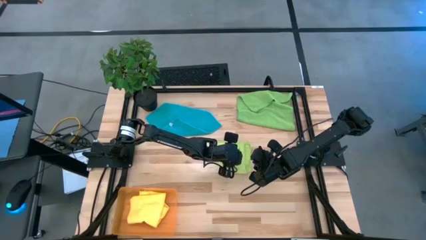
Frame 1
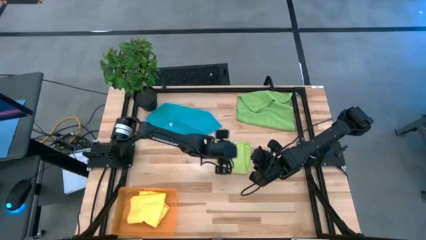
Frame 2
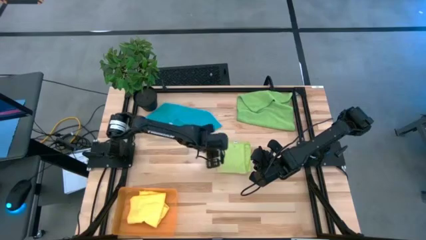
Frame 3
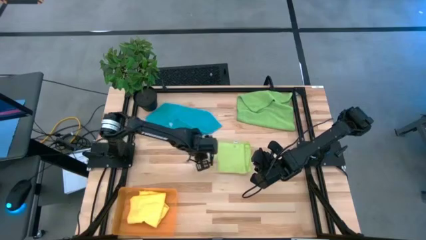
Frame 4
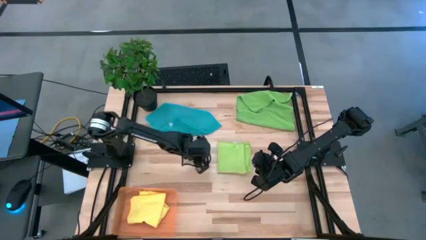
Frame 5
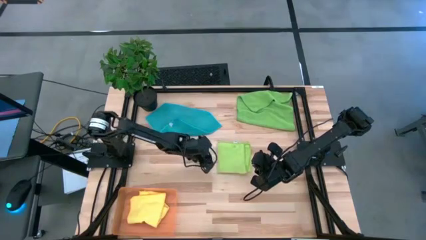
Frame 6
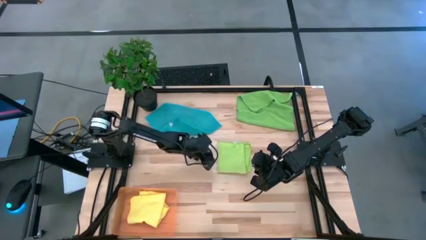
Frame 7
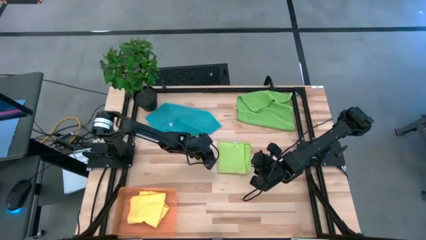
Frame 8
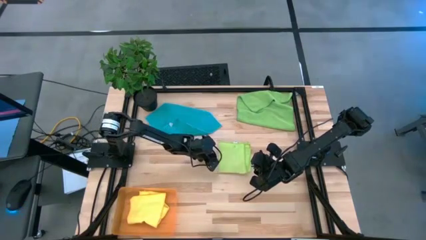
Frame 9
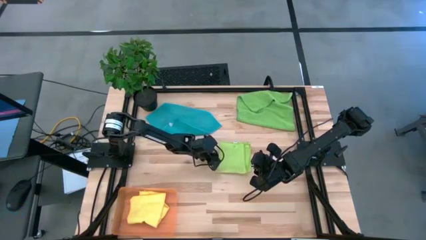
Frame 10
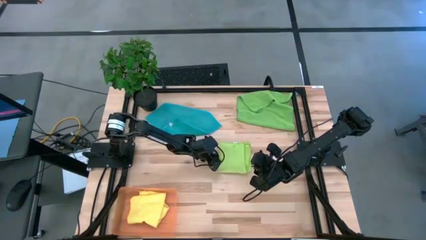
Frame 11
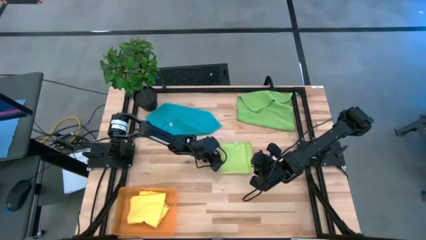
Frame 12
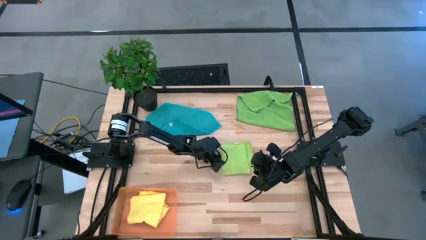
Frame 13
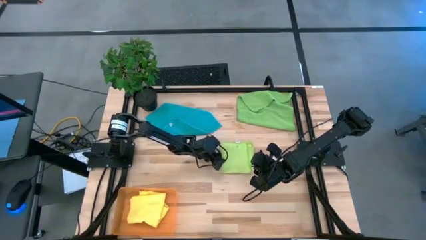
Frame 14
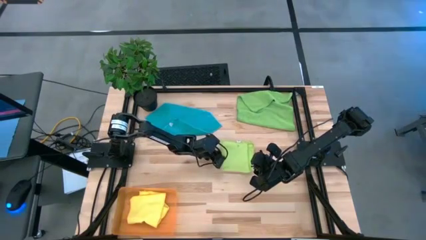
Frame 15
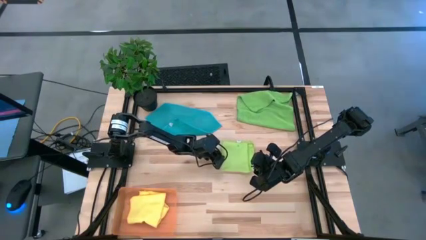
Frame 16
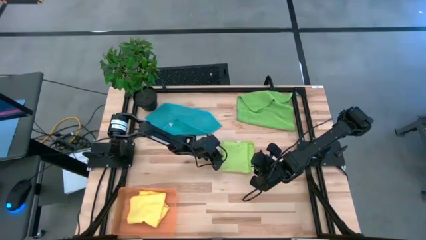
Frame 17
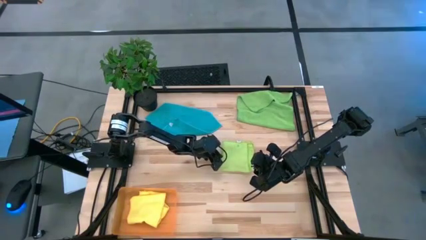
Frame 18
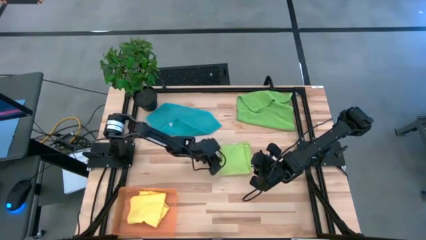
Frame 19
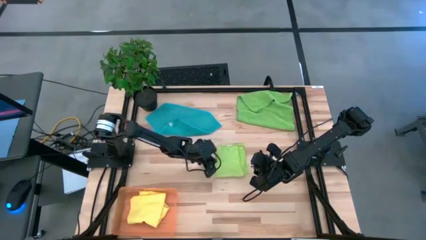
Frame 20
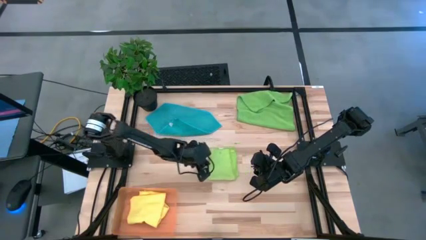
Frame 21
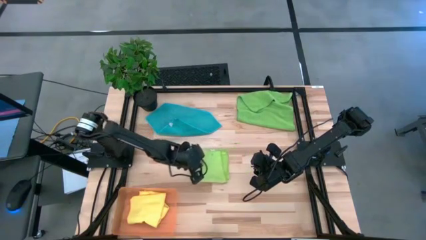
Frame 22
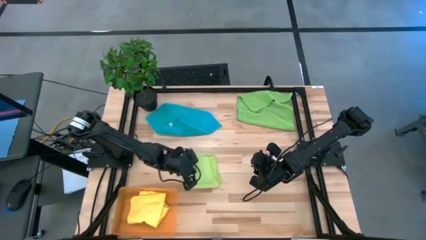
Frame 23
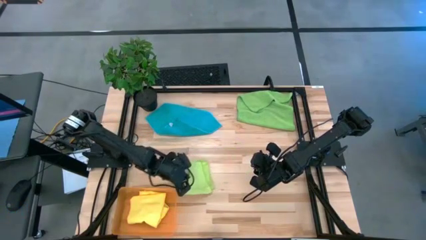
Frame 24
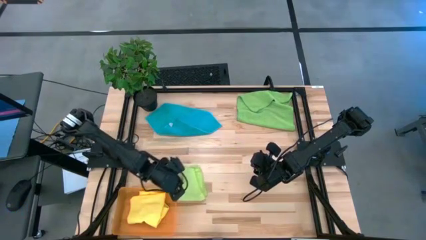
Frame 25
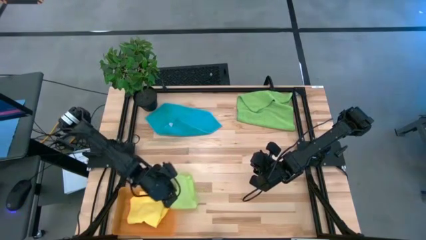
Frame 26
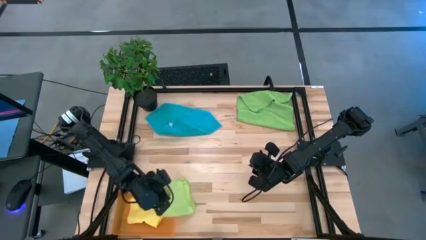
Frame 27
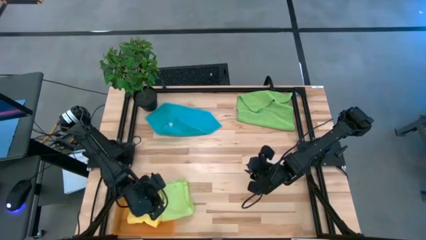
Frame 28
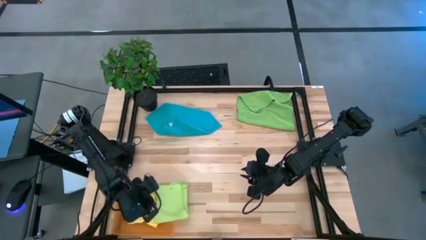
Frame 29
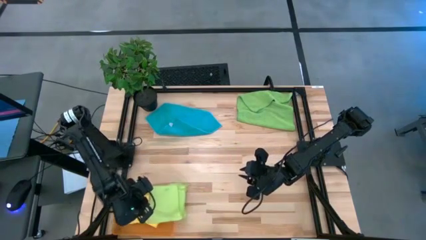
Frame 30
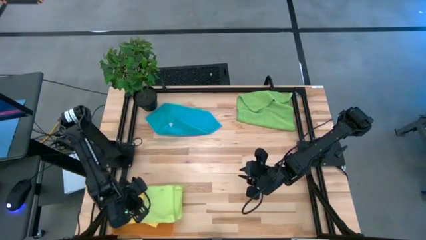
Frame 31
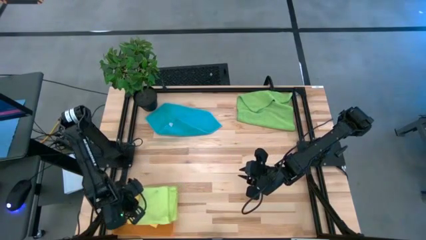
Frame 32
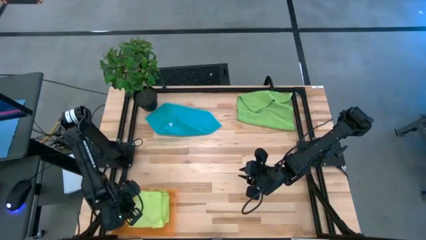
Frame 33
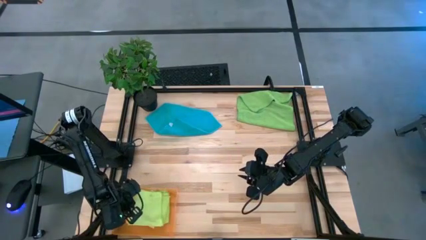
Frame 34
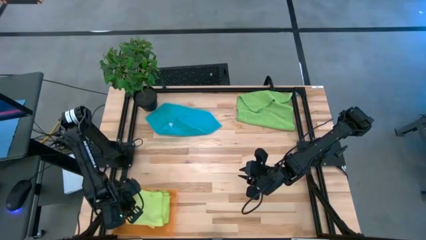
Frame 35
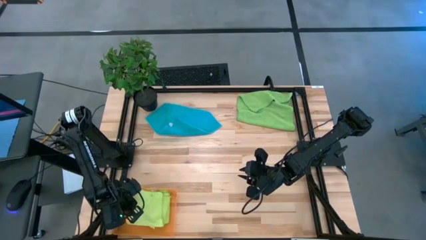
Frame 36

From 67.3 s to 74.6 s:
Task: Fold microfiber towels
Put the light green towel into the orange bin

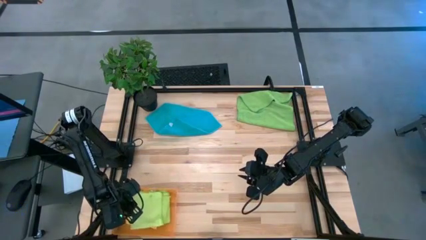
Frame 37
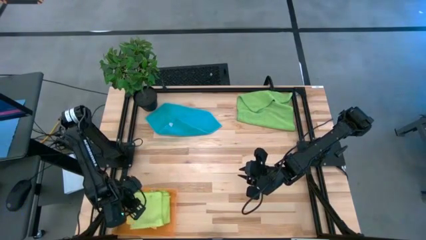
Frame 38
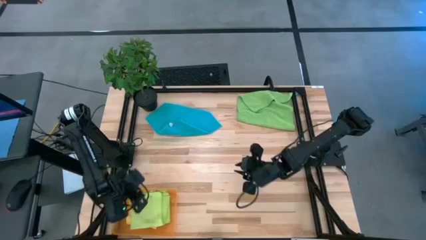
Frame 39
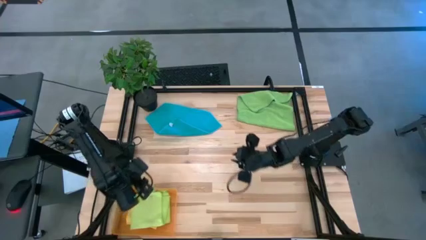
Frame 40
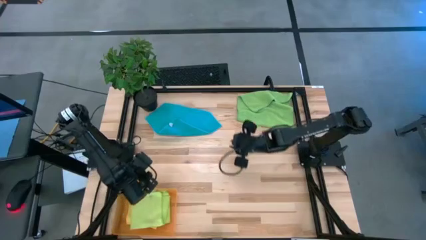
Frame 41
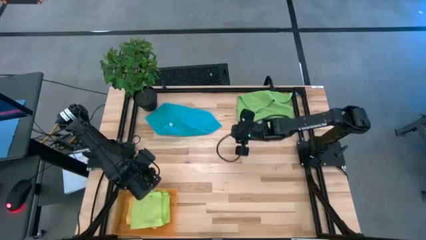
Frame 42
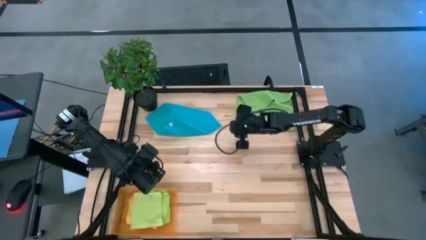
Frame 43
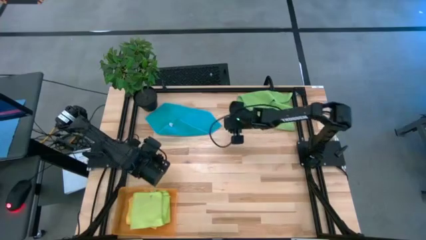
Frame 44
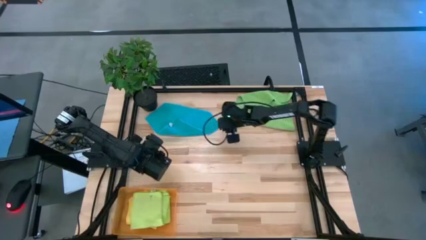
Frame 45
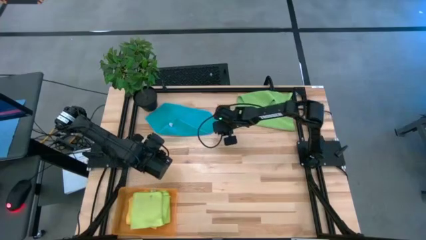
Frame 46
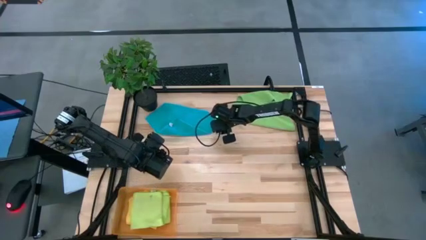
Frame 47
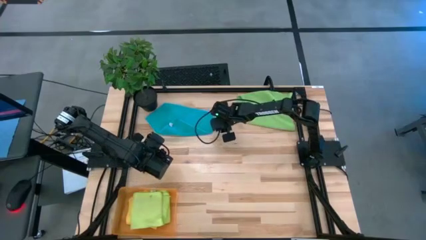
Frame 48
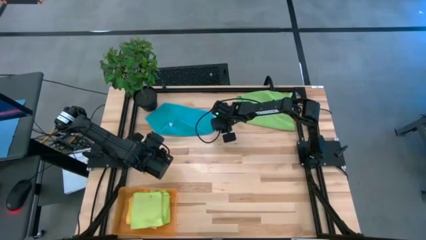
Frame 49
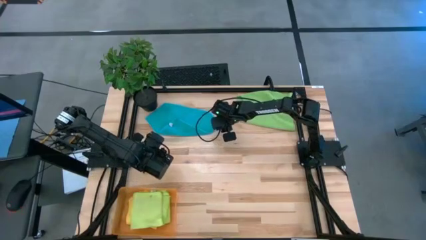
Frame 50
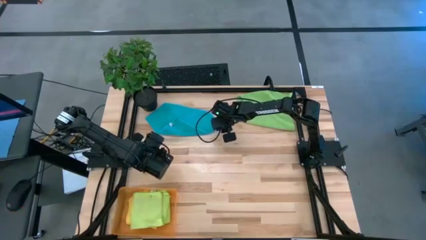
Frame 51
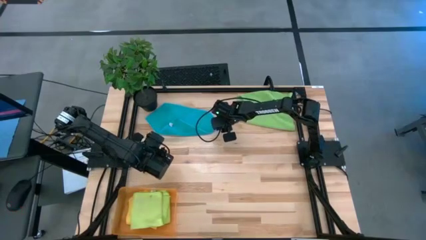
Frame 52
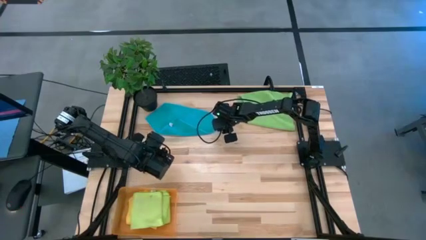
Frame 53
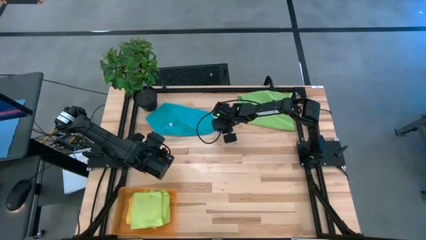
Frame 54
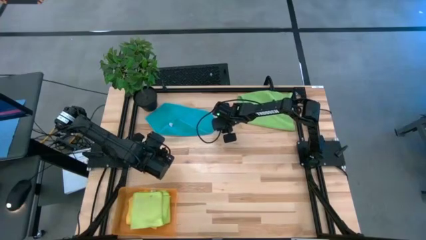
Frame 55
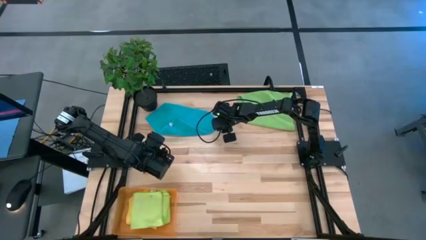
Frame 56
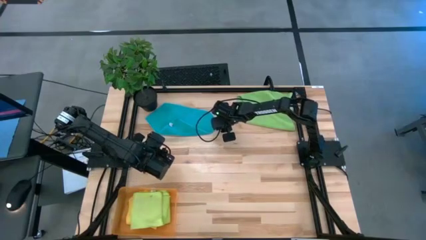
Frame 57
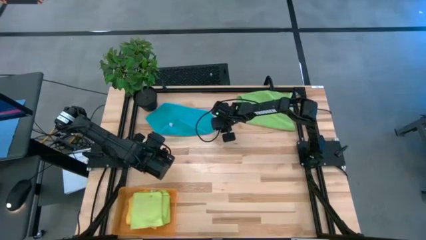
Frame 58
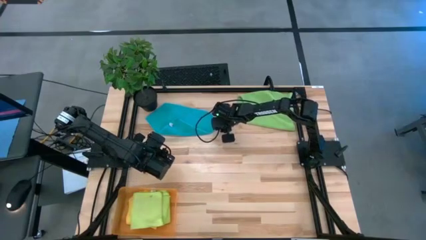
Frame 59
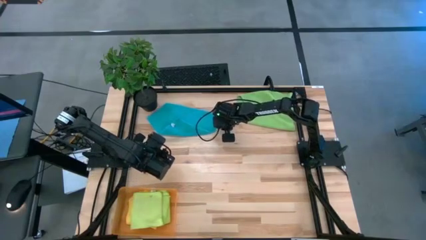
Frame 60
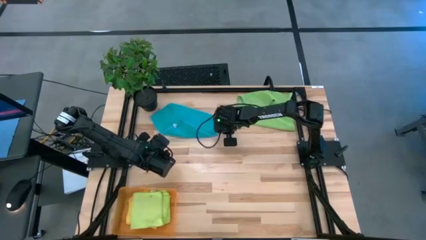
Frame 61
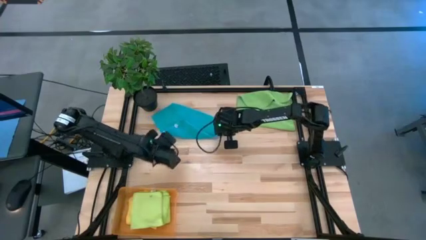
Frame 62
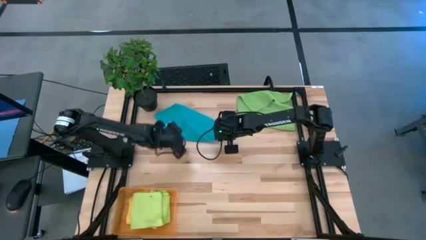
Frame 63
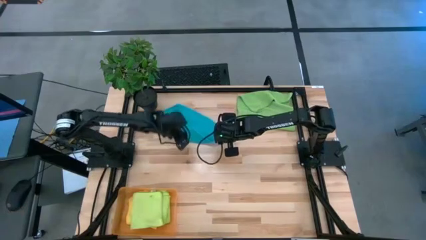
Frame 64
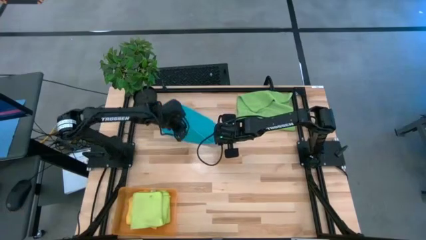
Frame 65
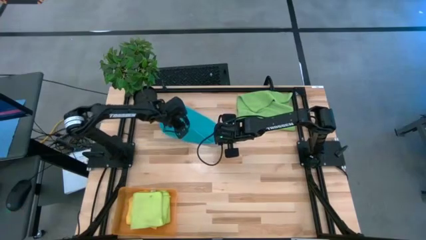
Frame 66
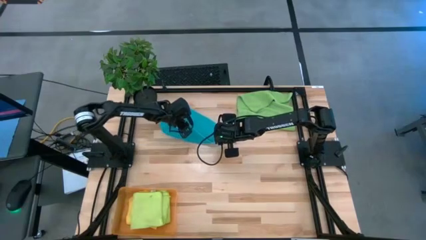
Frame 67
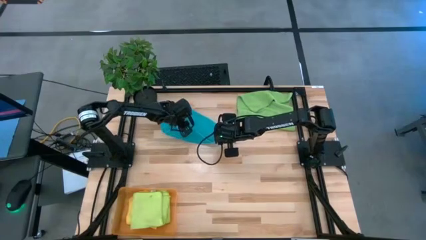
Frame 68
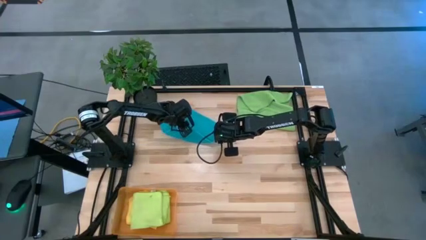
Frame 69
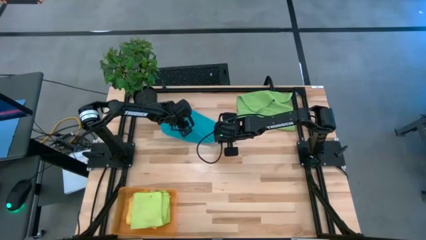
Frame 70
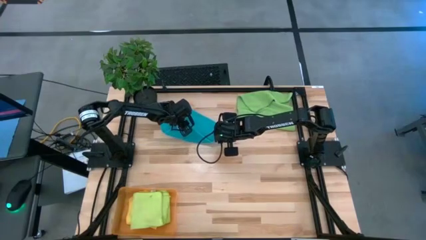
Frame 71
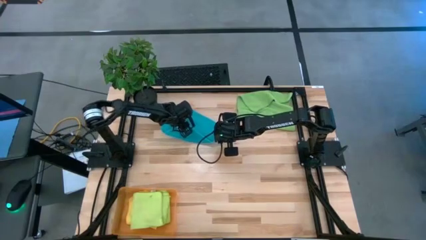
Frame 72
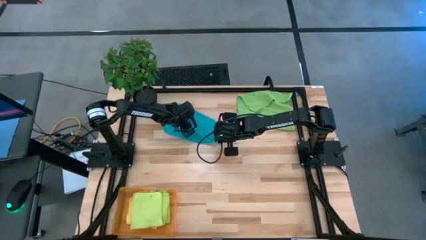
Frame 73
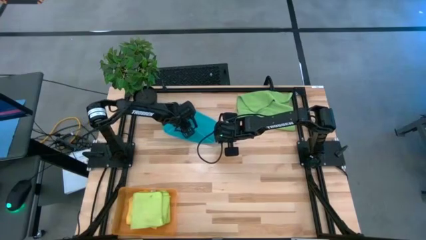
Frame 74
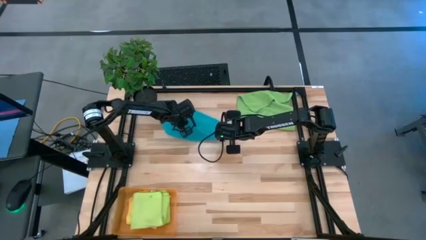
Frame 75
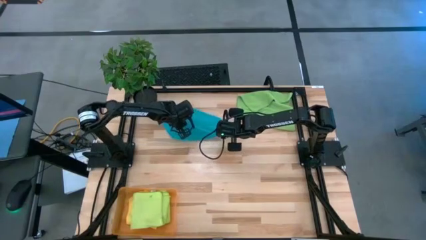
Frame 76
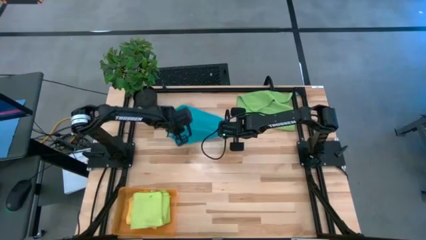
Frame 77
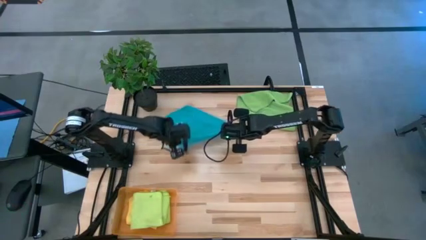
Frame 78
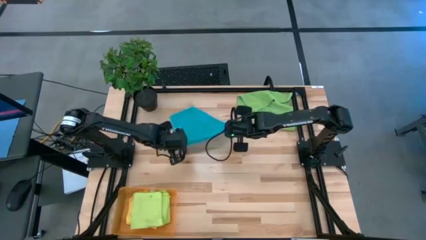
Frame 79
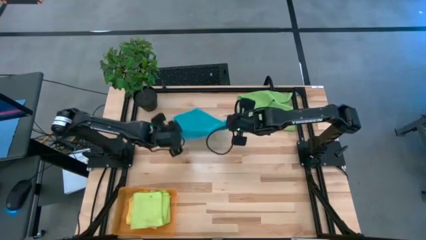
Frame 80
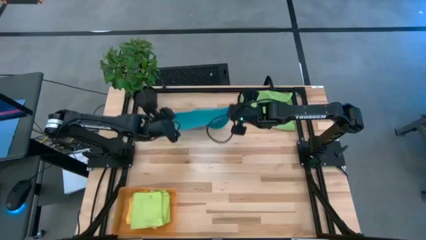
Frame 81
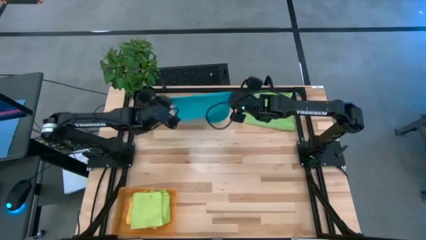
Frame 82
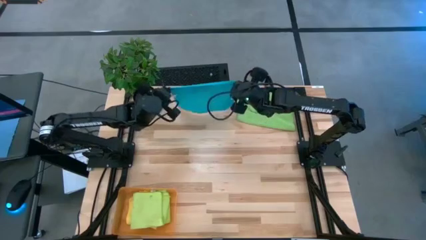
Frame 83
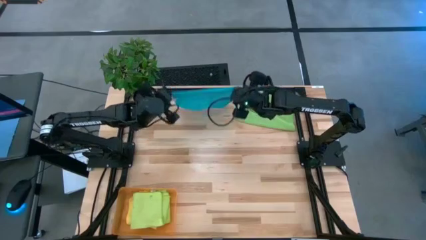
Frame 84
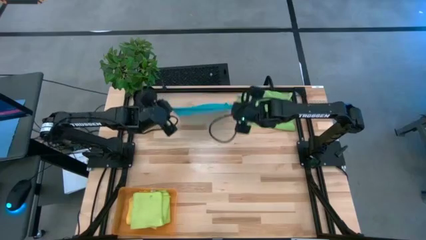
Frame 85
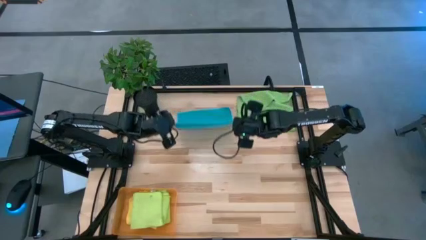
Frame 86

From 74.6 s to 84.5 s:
Fold the blue towel
